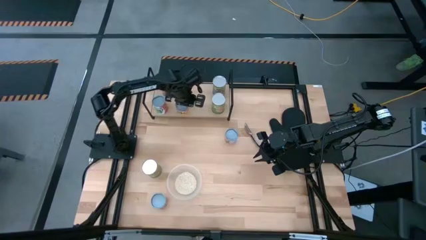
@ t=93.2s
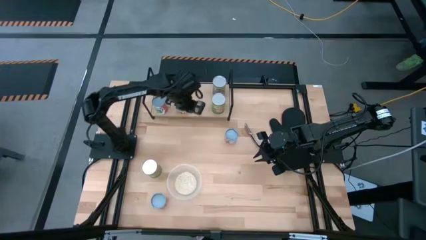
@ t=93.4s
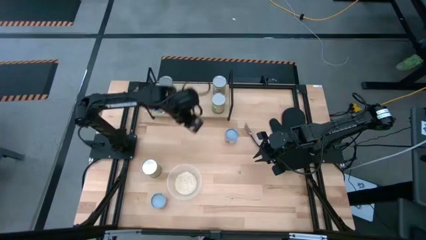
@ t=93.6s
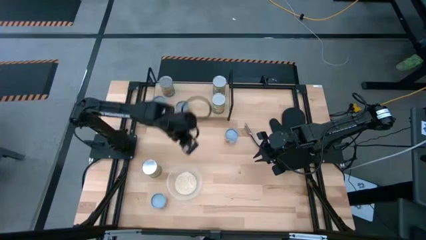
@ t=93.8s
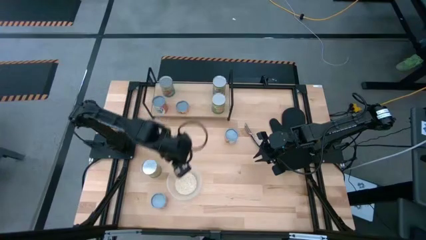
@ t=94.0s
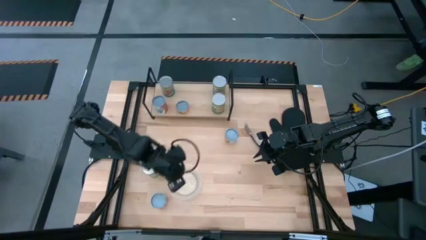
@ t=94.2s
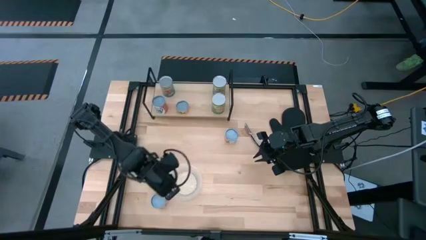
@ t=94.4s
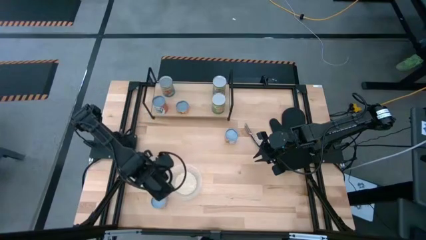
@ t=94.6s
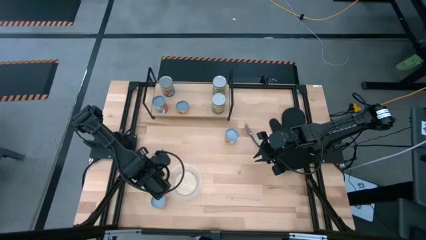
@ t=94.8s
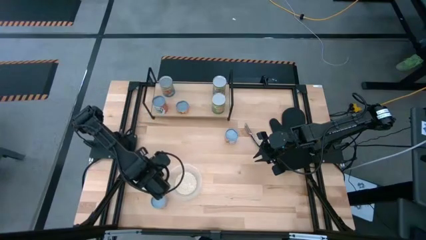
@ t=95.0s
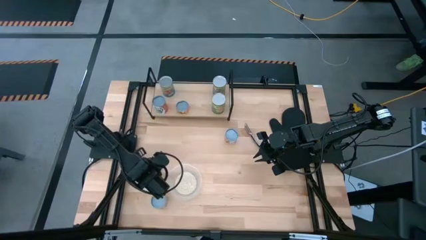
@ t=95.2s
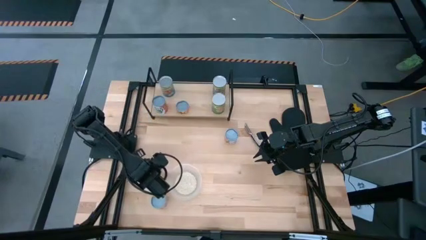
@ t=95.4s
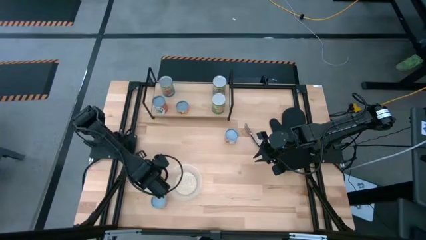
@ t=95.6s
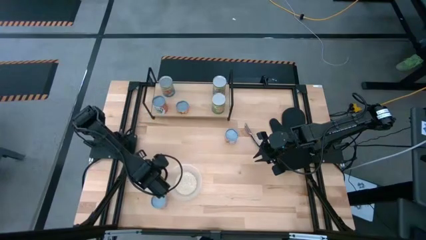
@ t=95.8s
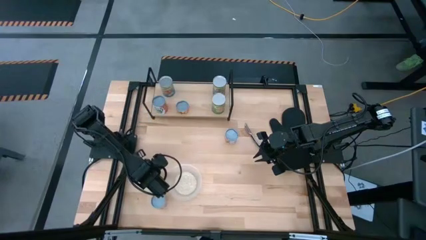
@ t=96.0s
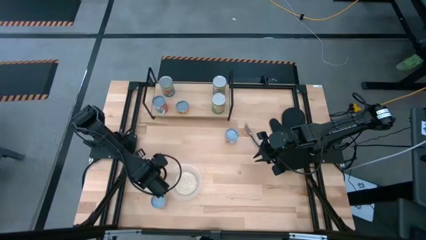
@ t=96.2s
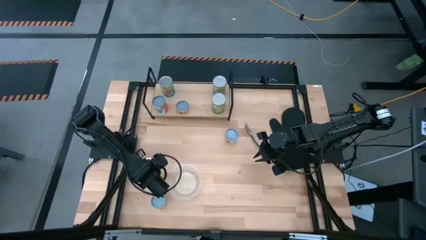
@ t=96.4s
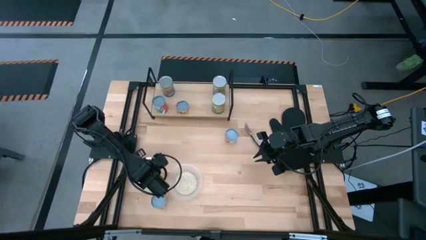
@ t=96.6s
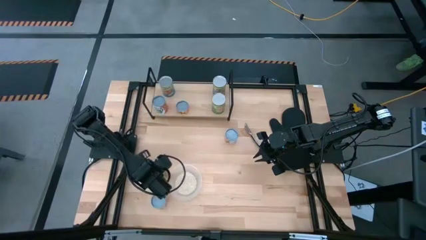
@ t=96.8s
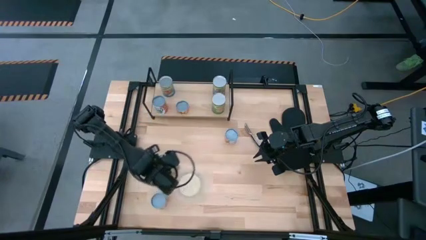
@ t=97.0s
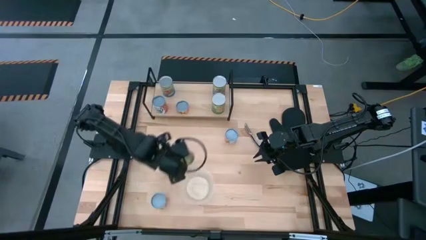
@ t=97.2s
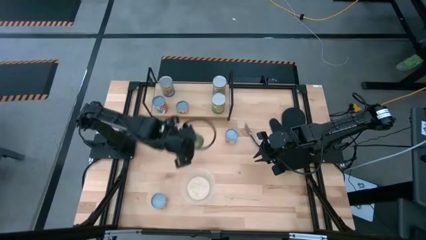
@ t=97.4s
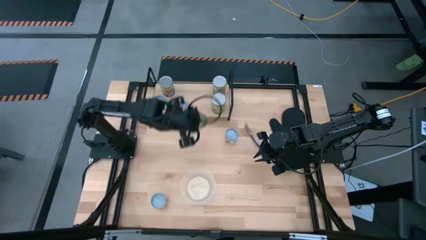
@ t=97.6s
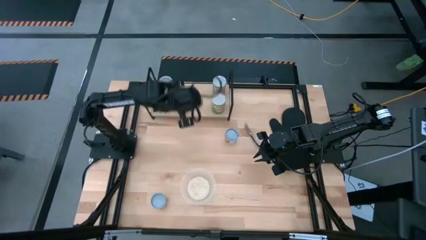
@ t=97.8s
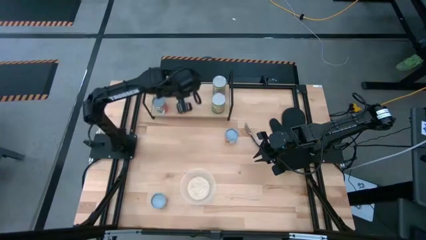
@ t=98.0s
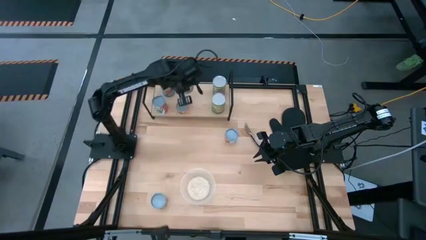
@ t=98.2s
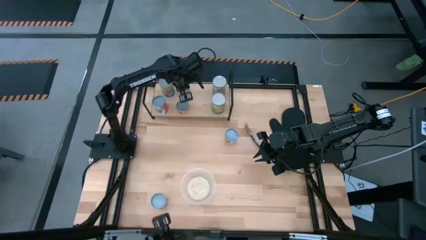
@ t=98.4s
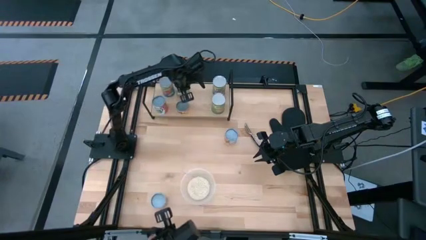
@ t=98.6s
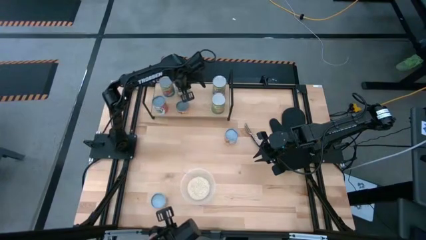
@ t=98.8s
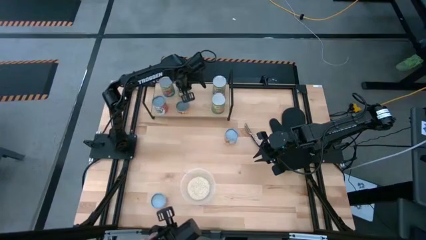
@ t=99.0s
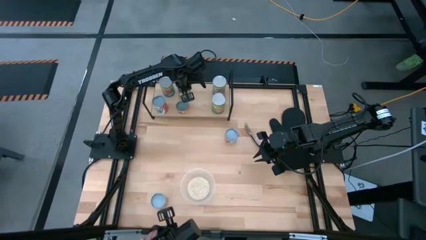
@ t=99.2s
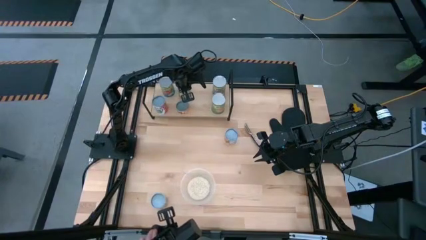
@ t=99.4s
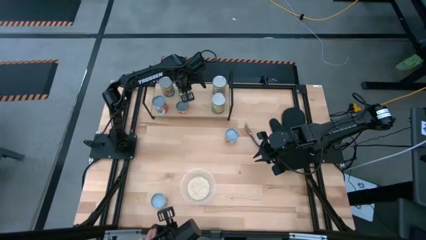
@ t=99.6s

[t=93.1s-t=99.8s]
Task: Pick and place cans onto a shelf
Put the canned pears on the shelf

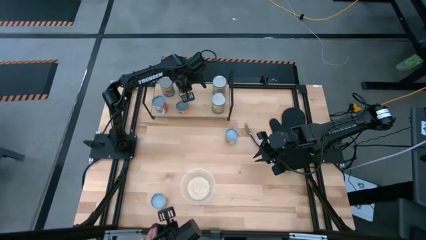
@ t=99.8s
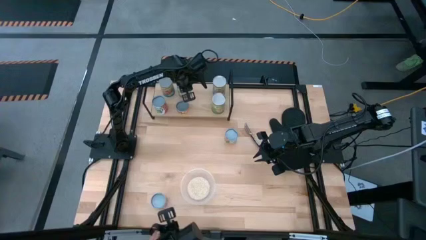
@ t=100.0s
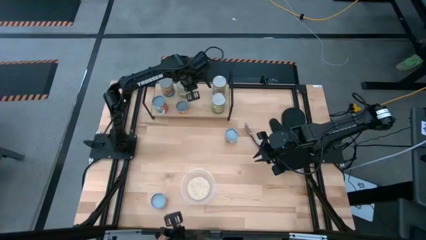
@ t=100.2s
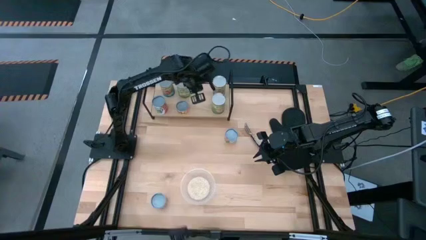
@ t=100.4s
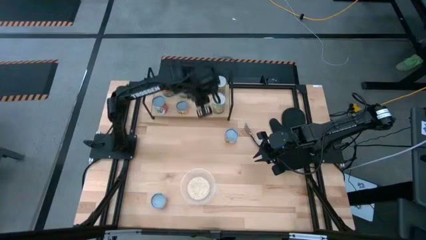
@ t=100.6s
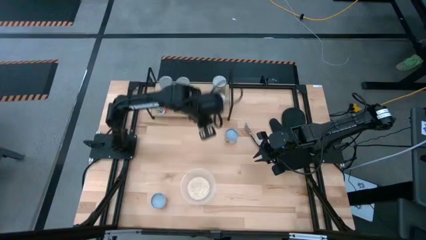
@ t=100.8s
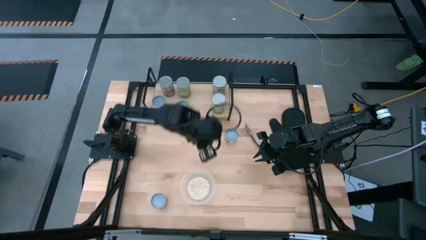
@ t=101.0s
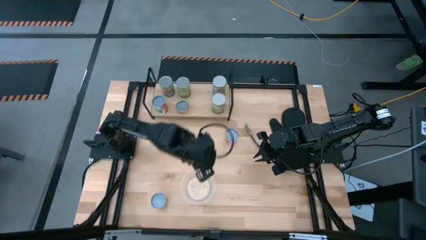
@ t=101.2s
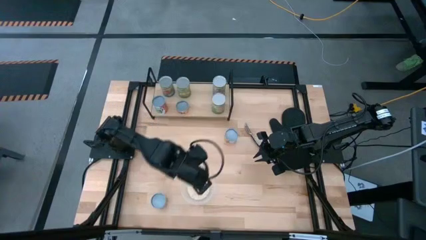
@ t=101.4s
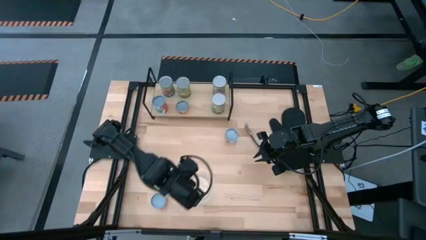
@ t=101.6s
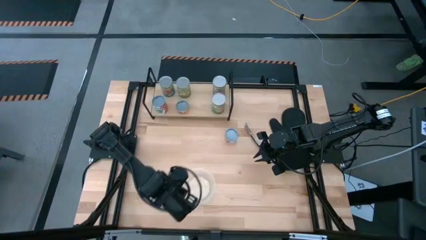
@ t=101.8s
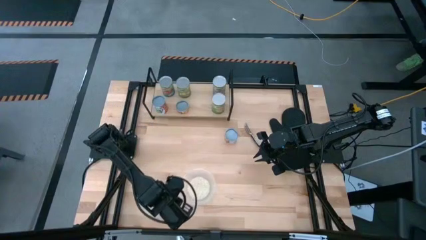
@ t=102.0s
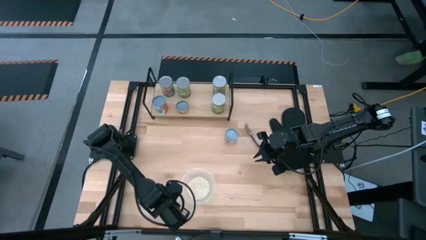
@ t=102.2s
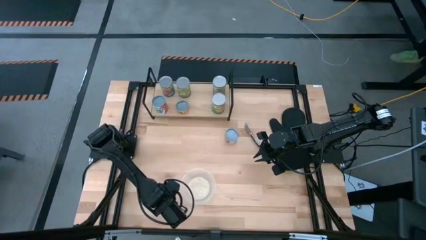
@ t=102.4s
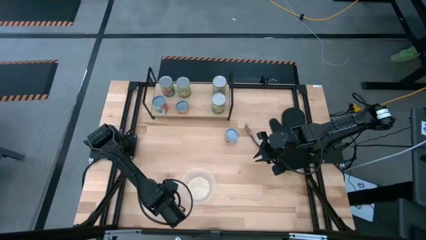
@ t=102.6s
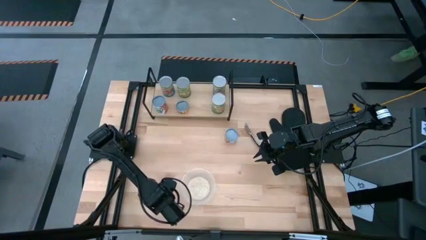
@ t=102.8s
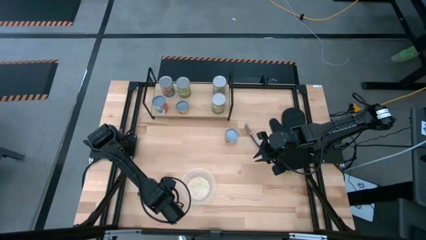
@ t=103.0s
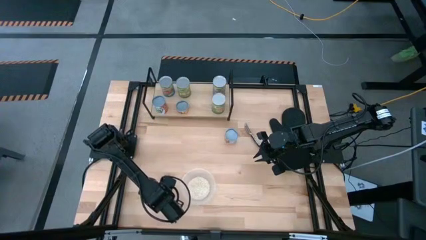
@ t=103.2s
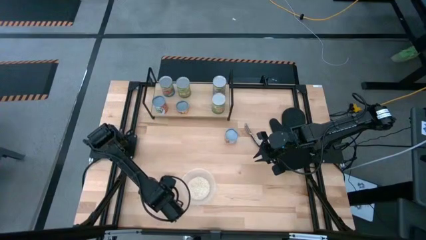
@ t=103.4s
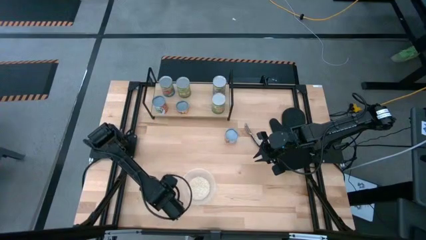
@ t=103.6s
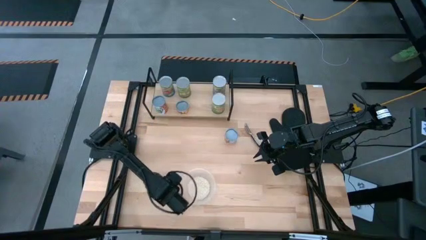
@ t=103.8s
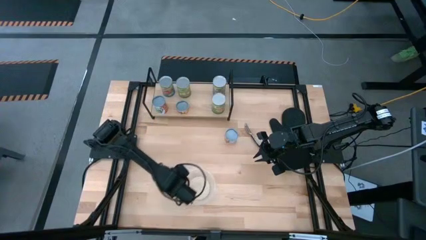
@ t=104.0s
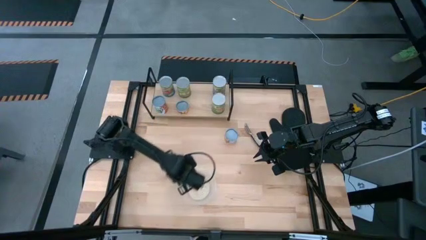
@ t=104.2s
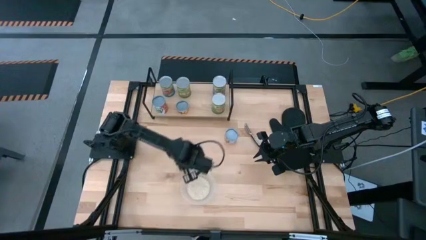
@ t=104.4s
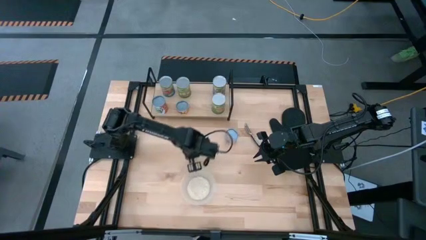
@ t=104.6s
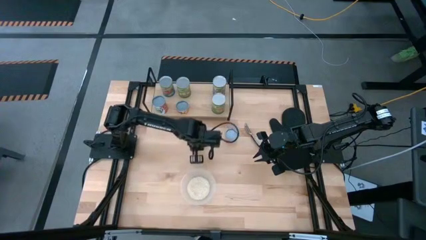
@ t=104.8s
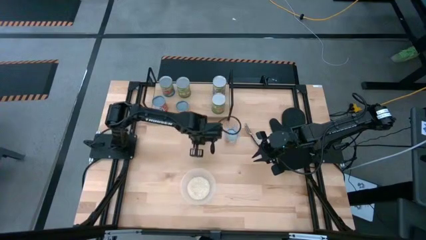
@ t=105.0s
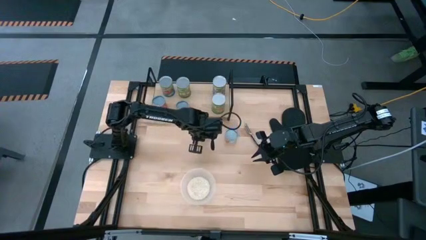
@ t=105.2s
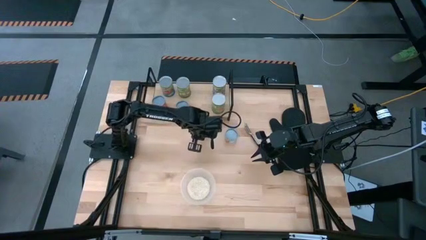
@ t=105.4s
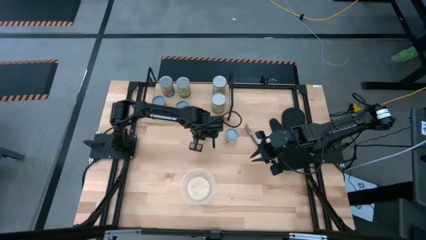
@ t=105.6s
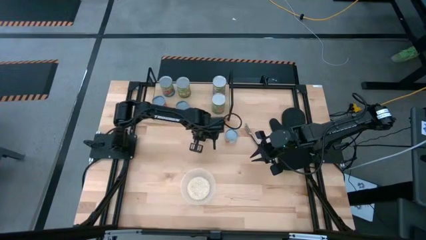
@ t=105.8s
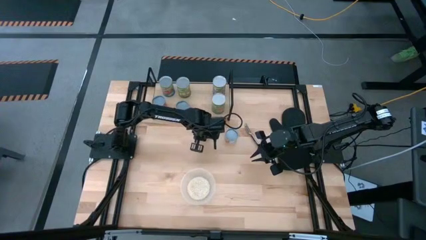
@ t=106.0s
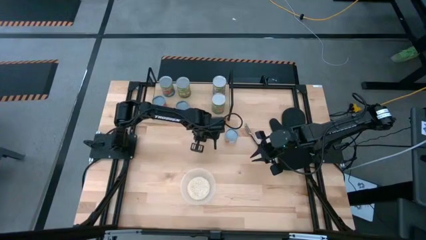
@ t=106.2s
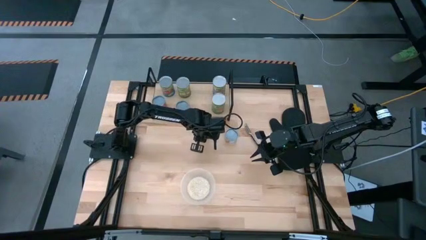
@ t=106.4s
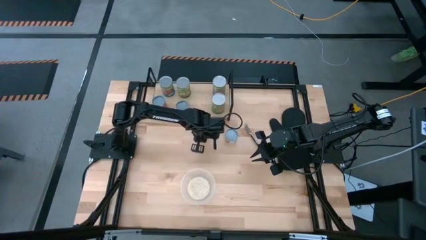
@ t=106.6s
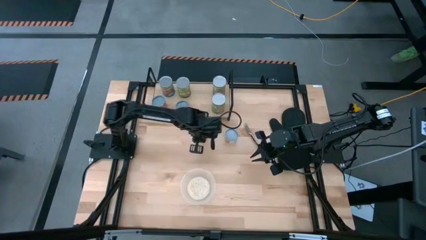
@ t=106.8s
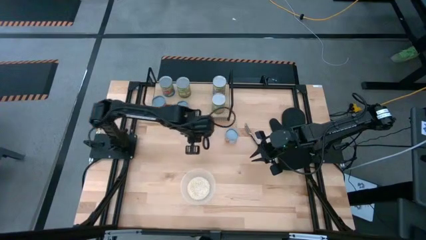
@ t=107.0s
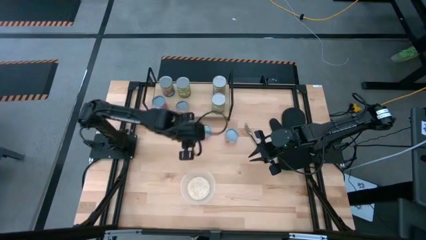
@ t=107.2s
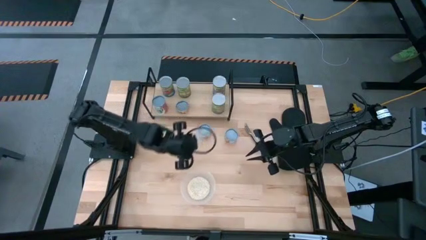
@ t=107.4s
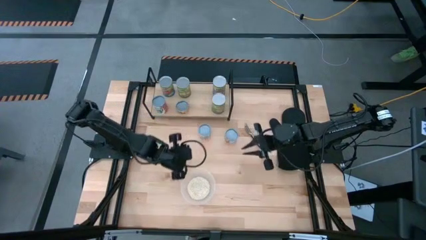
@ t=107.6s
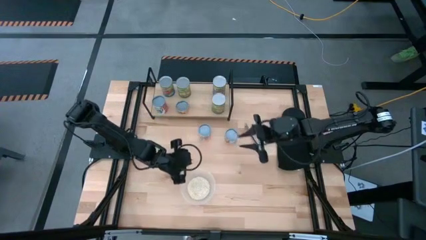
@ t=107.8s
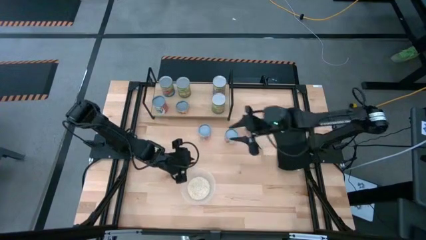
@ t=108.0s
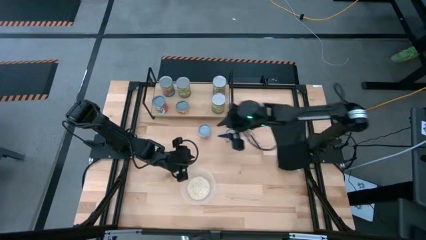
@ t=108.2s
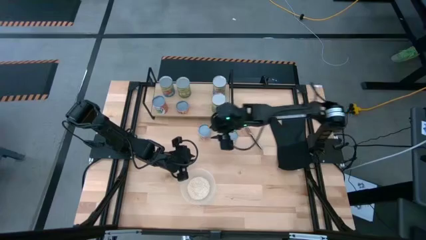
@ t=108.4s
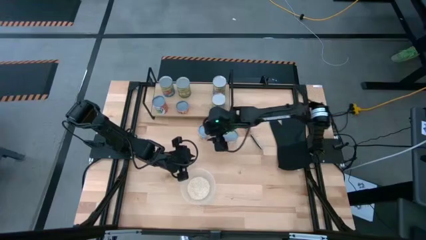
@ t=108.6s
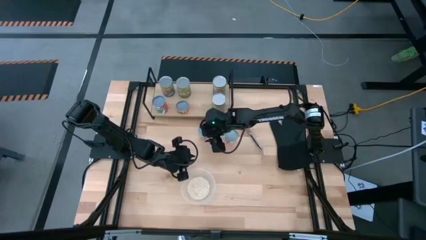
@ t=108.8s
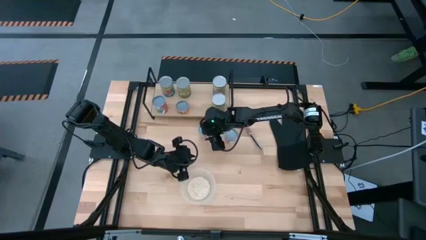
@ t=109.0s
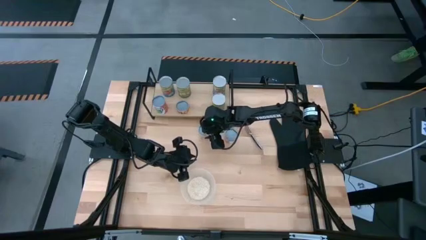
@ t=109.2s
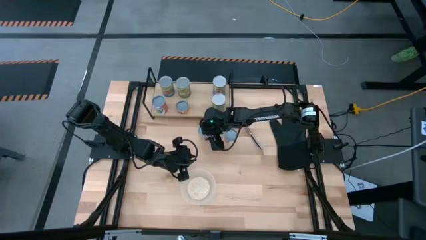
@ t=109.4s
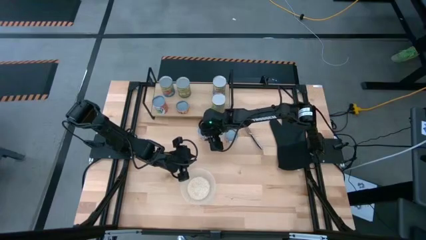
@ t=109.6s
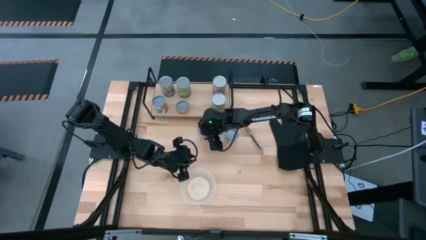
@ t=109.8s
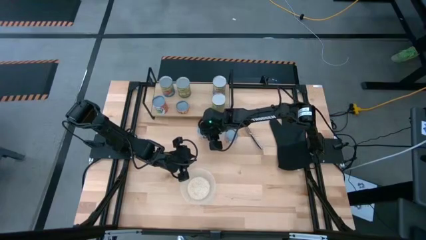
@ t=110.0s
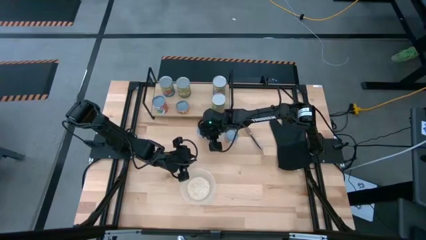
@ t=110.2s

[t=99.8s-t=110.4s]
Put the canned diced tomatoes on the shelf
